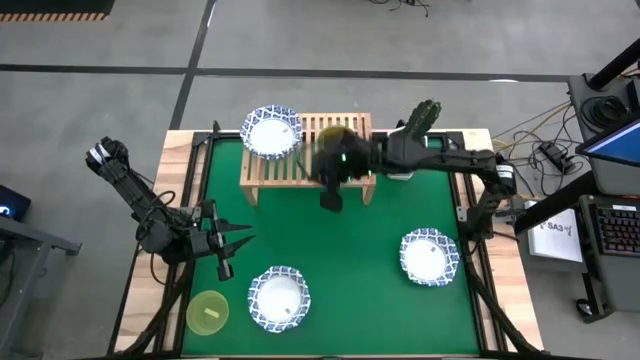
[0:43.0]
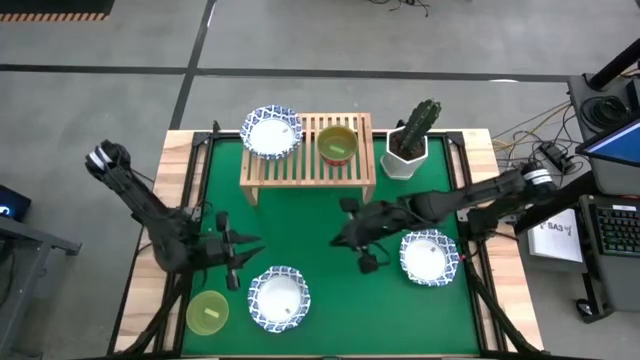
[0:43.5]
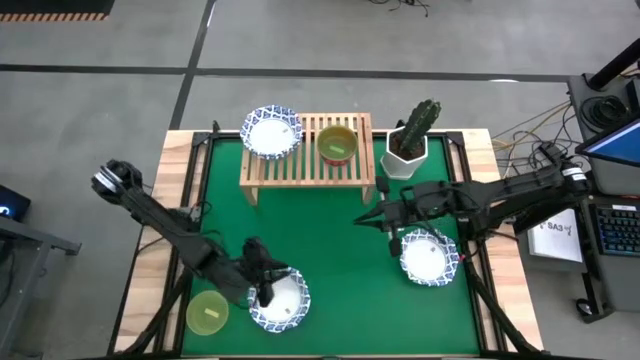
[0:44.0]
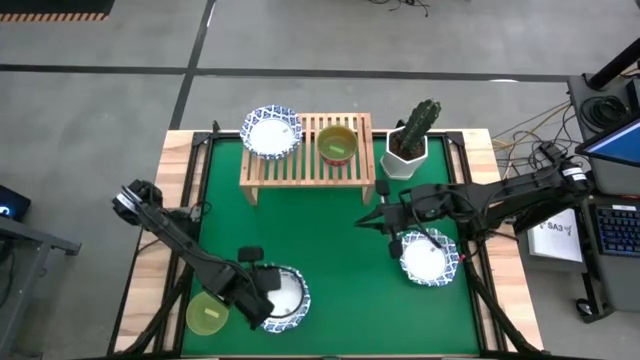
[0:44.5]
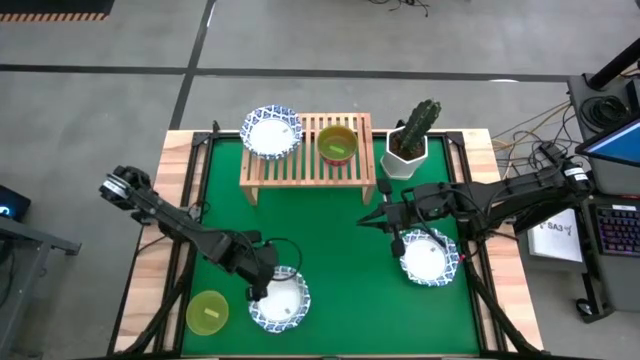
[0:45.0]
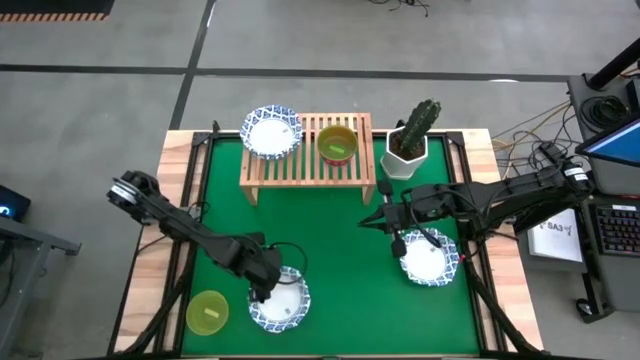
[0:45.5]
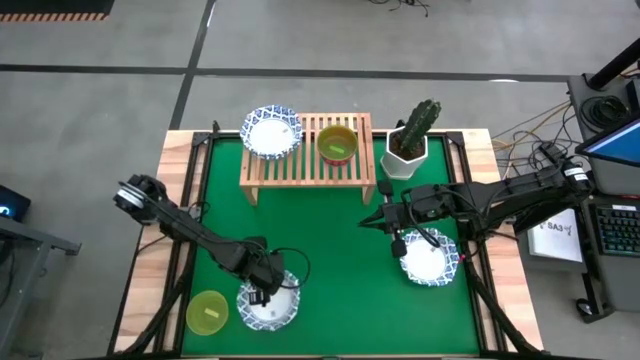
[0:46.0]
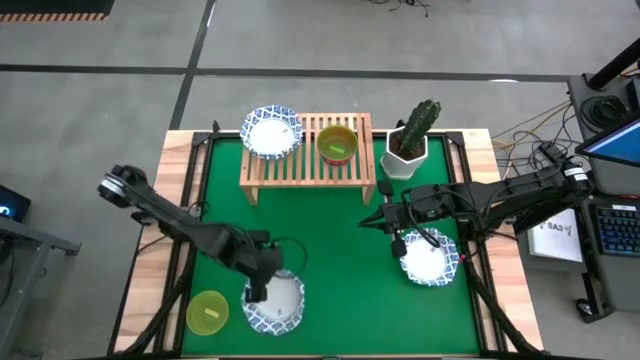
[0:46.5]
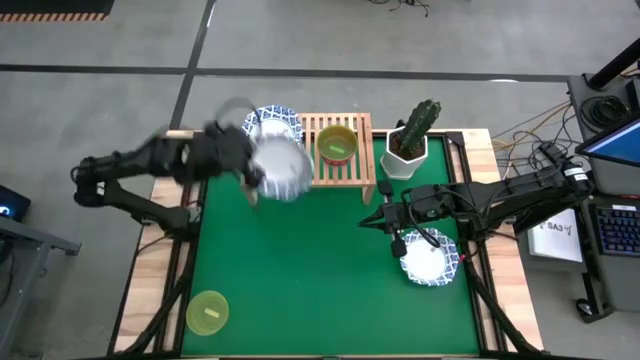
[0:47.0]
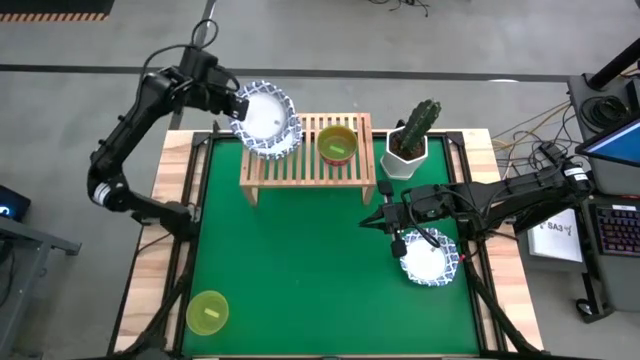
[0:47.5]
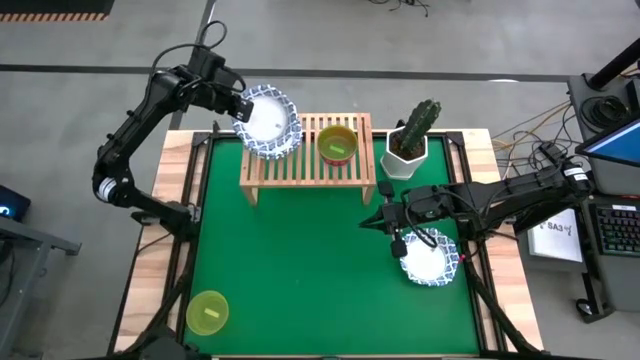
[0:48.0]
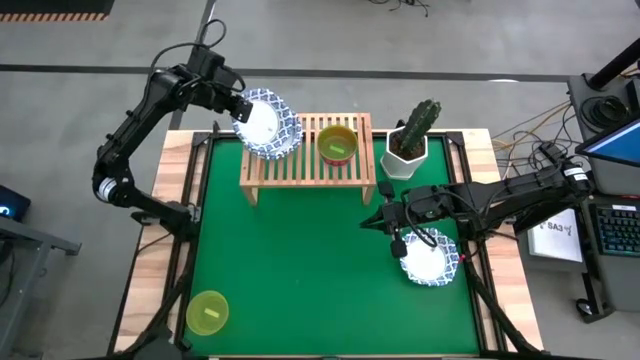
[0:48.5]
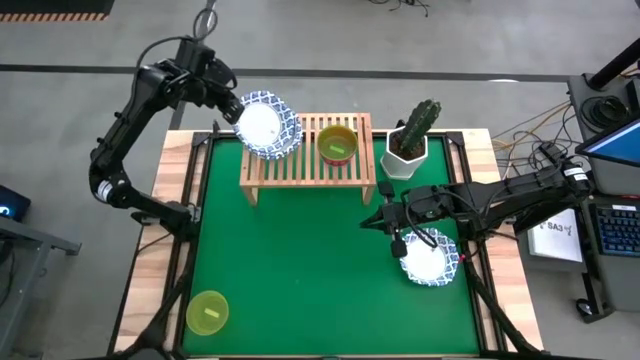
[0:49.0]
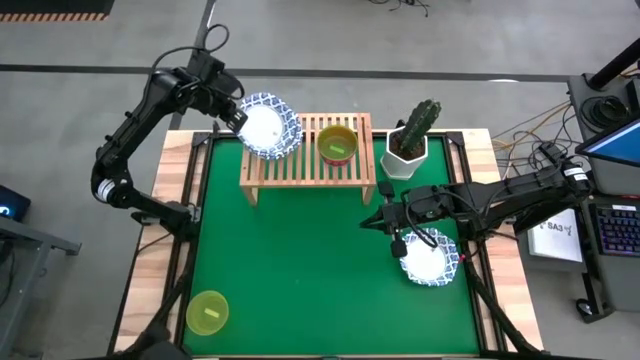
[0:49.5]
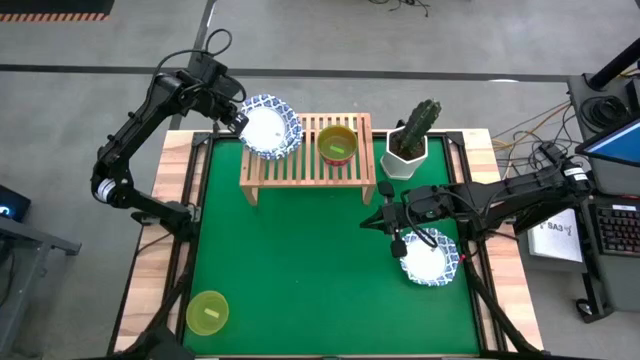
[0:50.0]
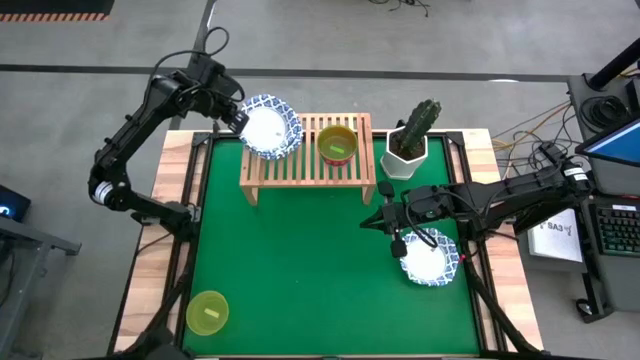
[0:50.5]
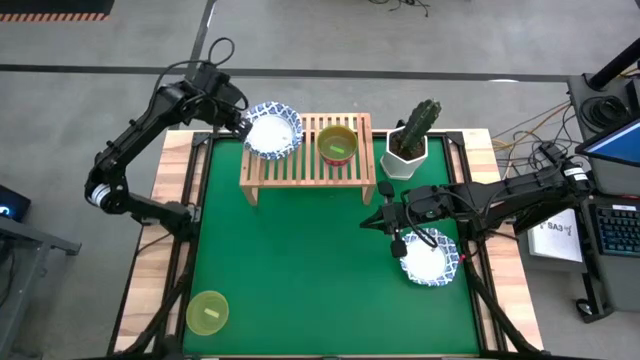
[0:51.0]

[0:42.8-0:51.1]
Task: Place and stack bowls onto a shelf
Stack the left white and blue bowl on top of the white and blue bowl on the shelf

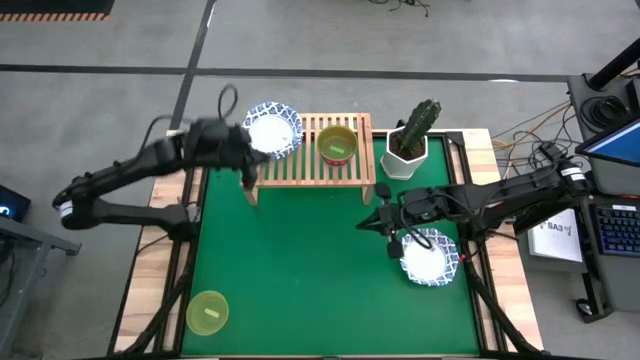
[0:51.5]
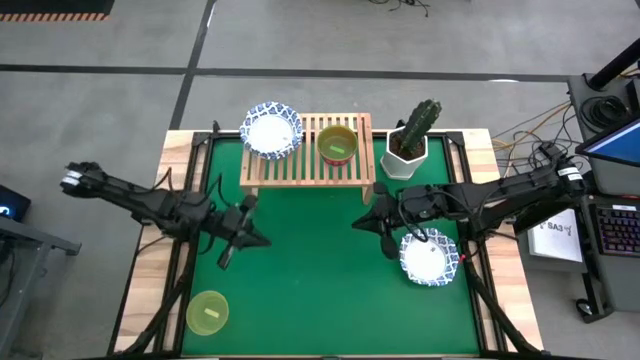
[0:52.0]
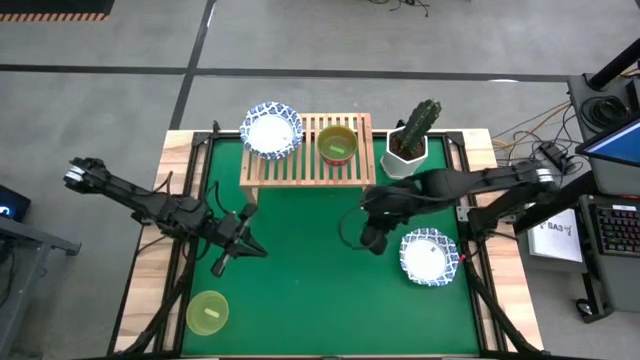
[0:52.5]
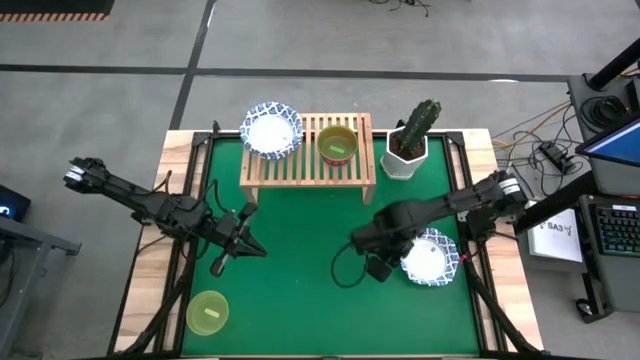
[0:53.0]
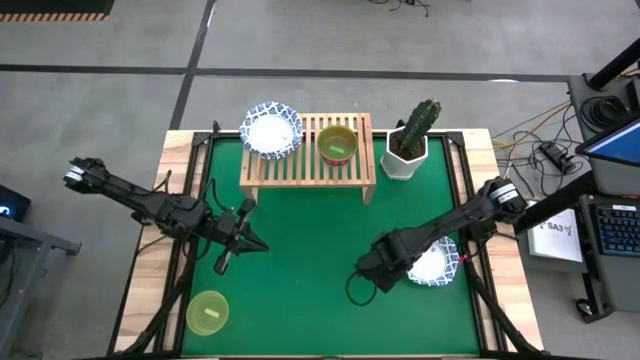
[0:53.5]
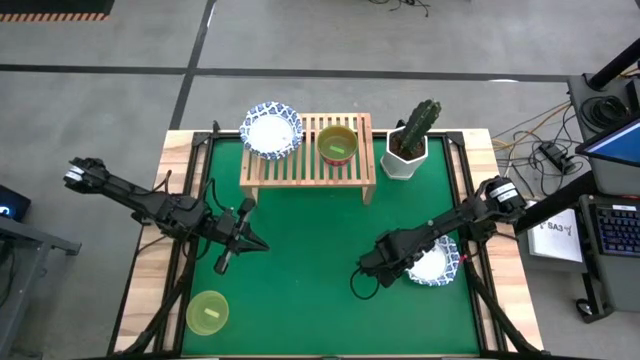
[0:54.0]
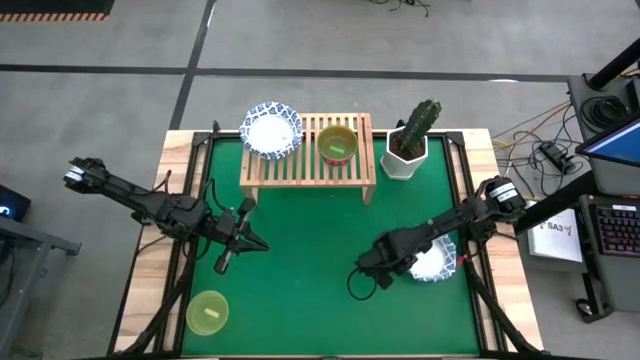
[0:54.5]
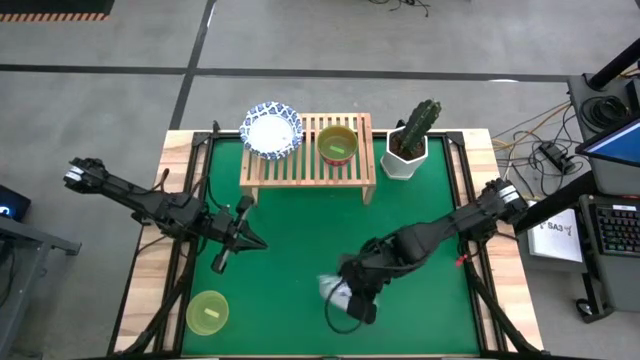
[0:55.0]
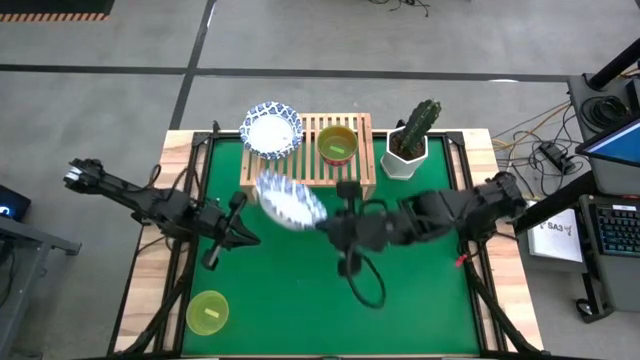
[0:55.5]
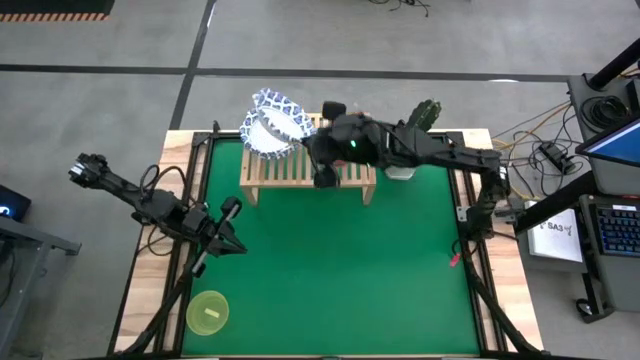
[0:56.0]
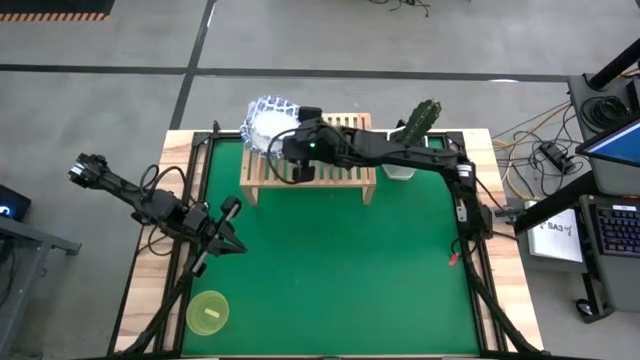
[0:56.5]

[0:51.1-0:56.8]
Stack the white and blue bowl on top of the white and blue bowl on the shelf

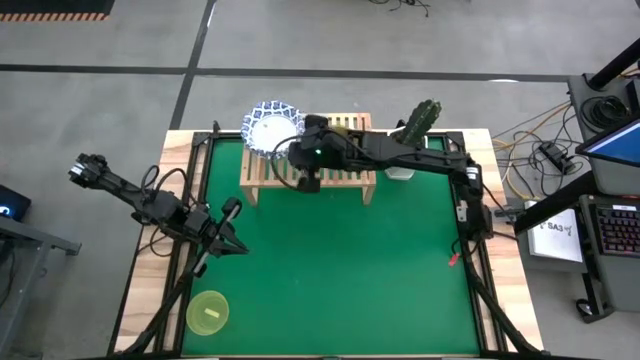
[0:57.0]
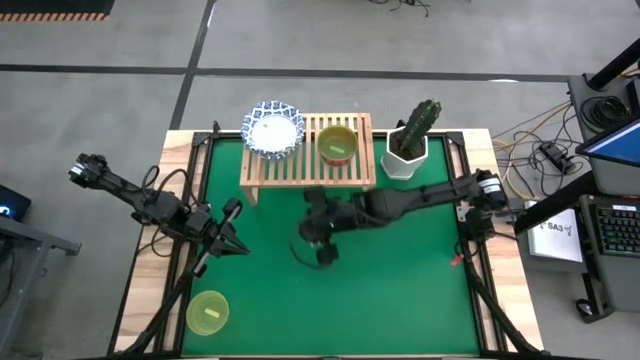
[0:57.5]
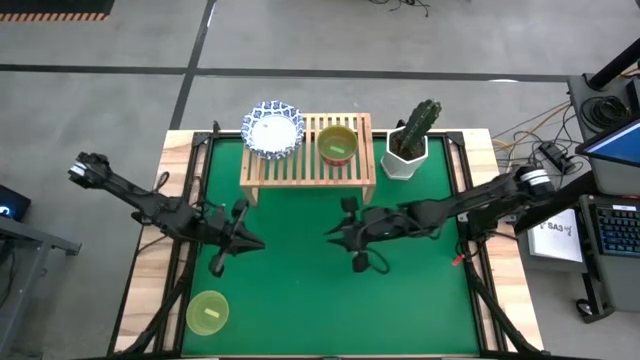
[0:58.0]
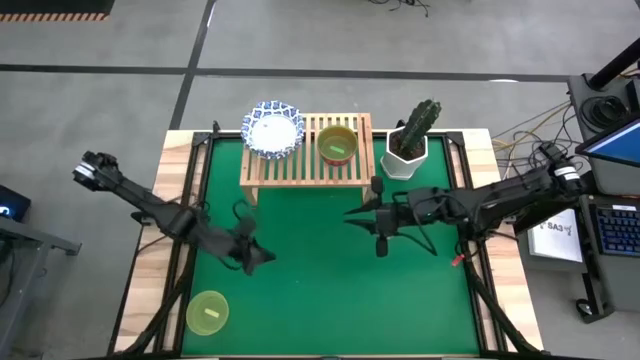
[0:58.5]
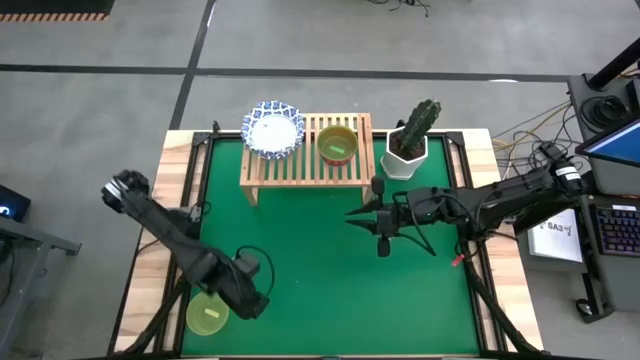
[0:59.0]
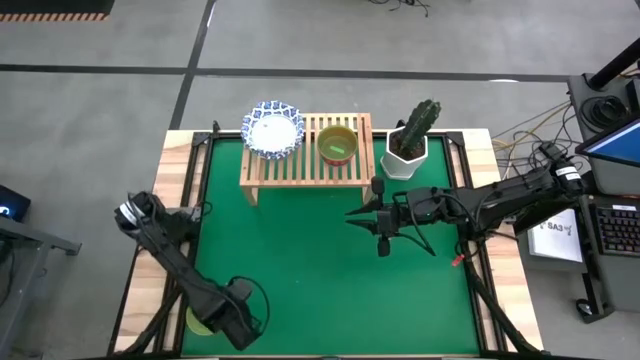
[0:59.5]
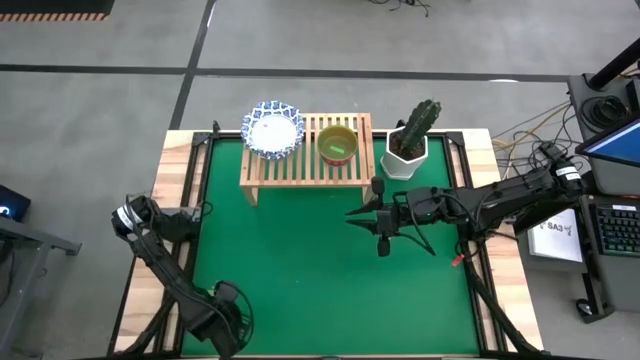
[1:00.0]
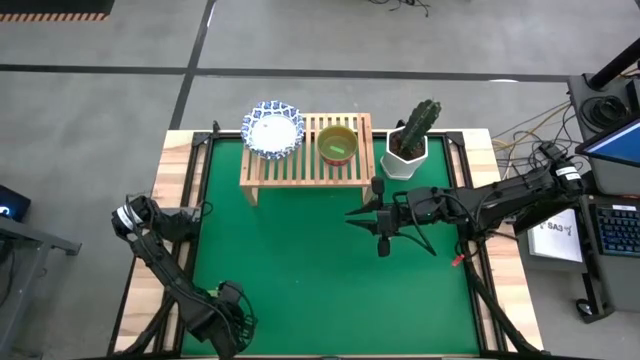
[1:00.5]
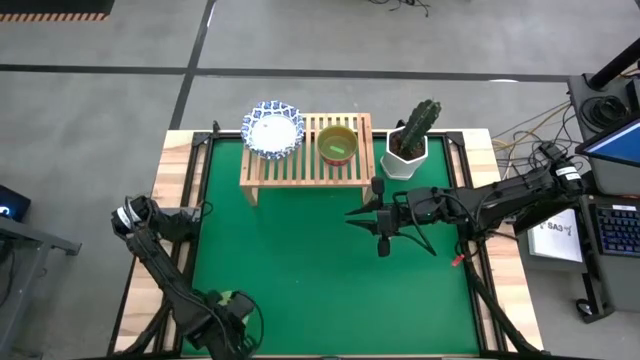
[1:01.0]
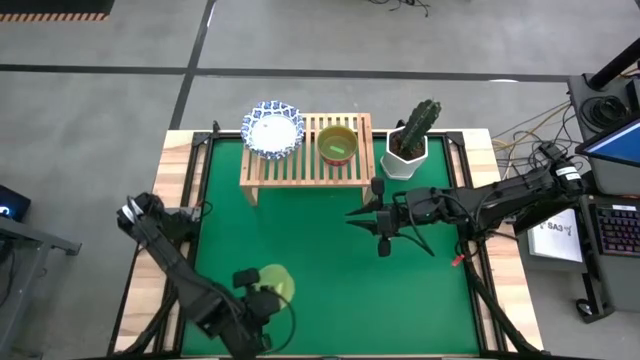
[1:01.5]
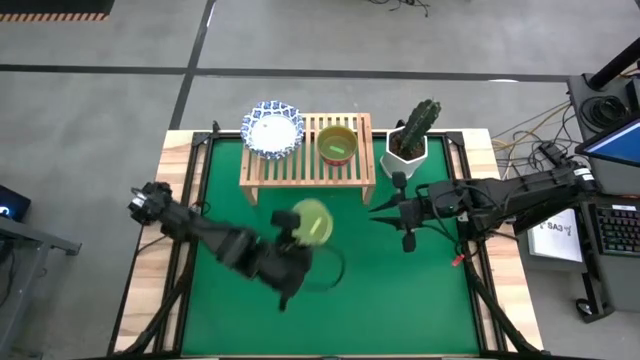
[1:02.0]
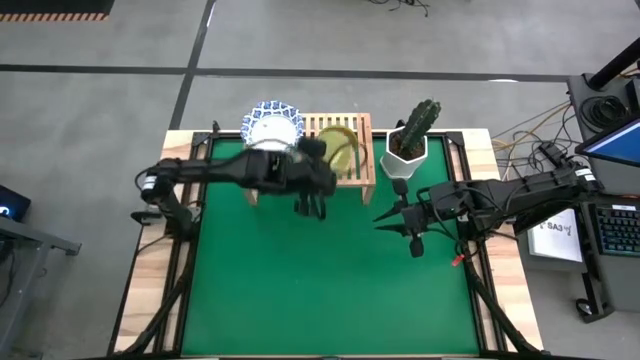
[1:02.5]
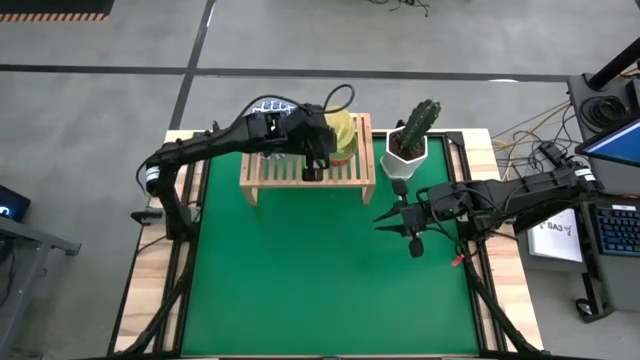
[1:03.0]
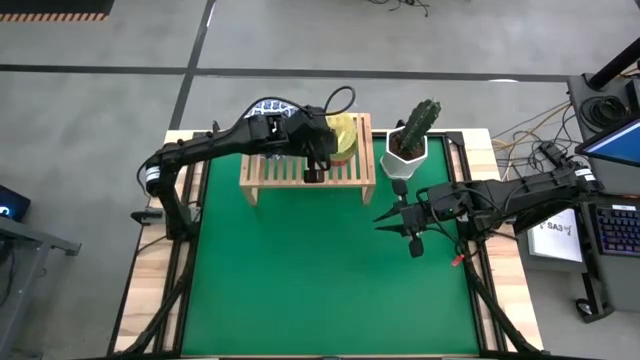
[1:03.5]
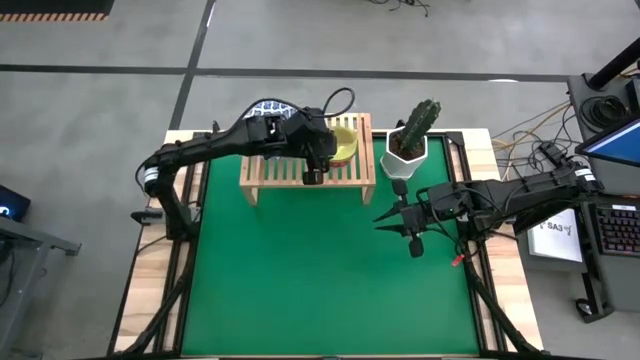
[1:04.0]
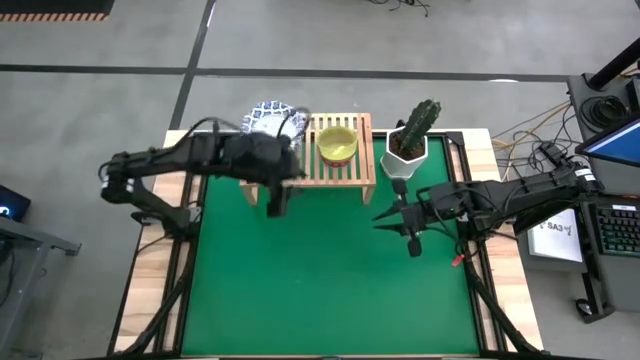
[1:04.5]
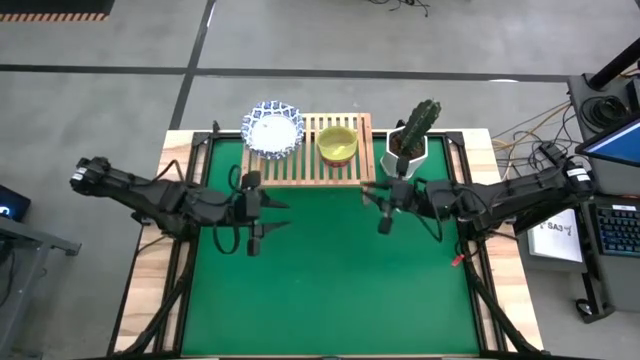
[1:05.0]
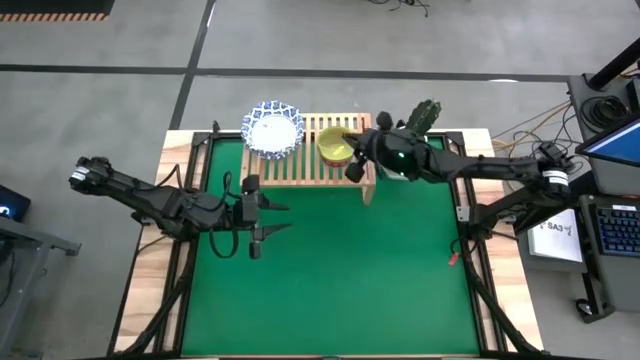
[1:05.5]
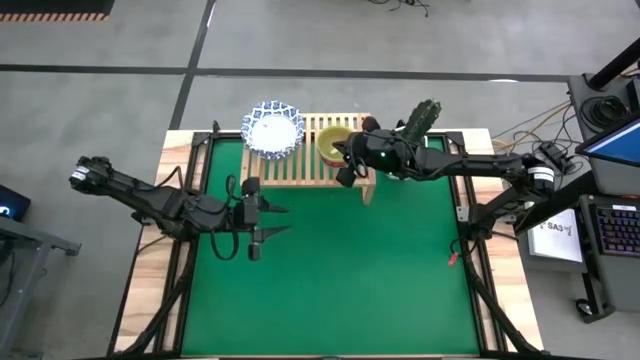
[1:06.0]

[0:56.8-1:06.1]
Stack the small yellow bowl on top of the small green bowl on the shelf
